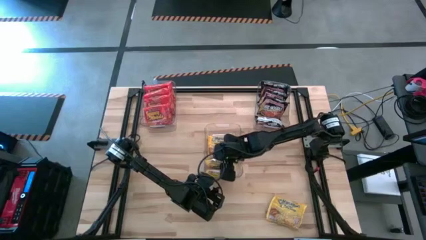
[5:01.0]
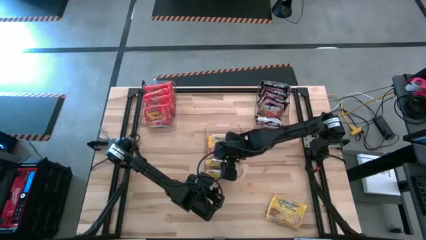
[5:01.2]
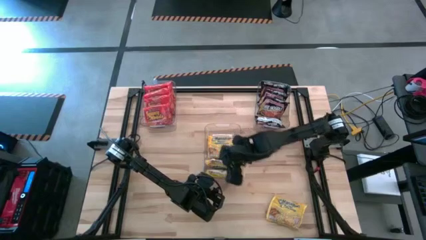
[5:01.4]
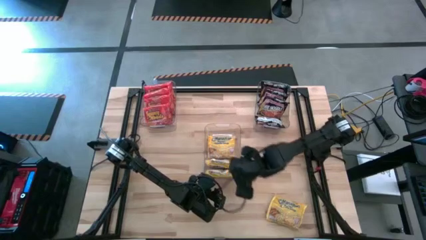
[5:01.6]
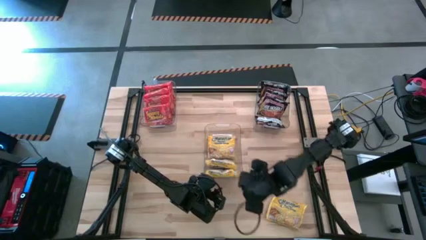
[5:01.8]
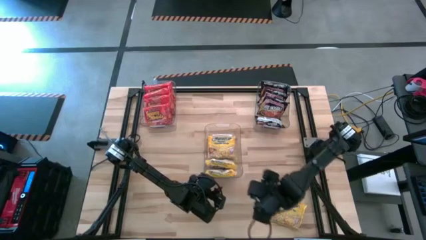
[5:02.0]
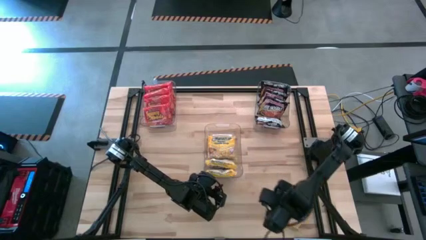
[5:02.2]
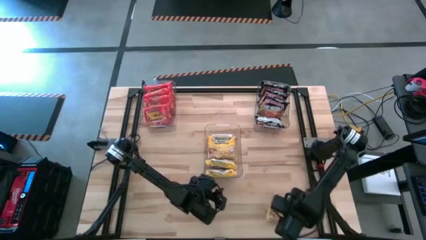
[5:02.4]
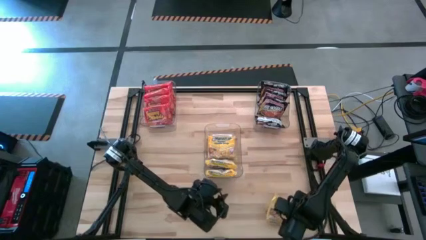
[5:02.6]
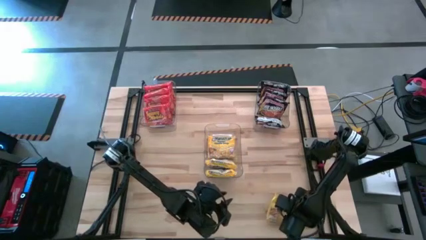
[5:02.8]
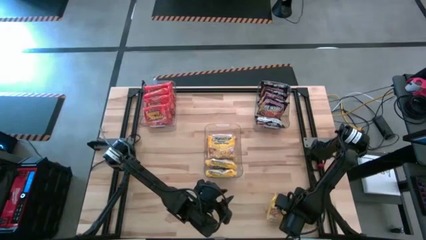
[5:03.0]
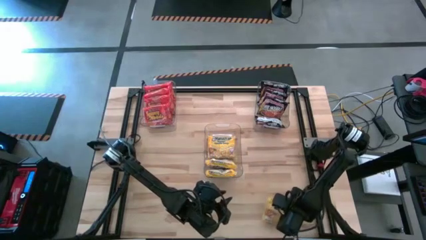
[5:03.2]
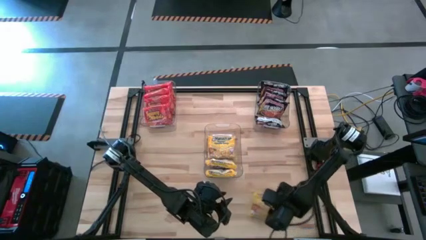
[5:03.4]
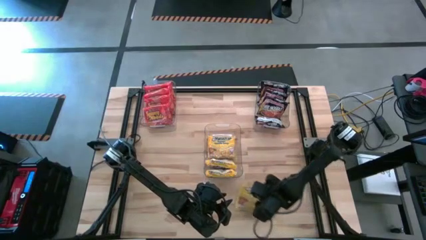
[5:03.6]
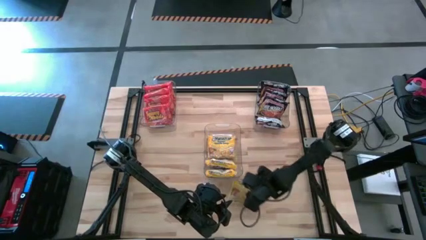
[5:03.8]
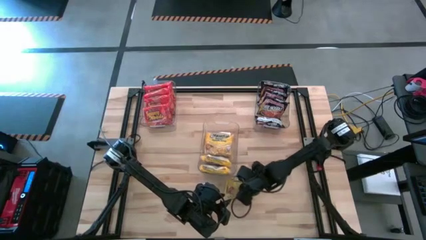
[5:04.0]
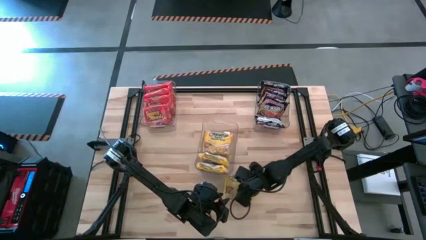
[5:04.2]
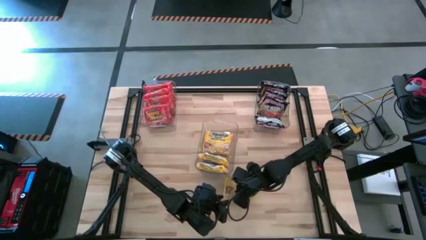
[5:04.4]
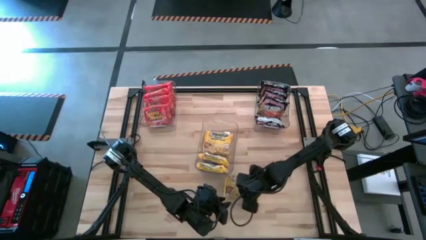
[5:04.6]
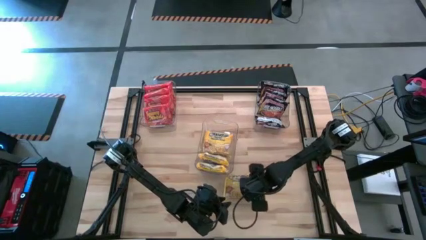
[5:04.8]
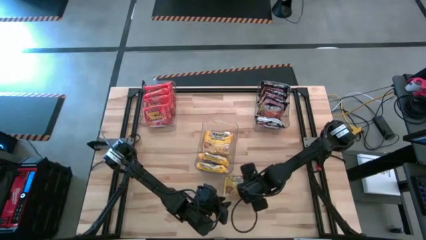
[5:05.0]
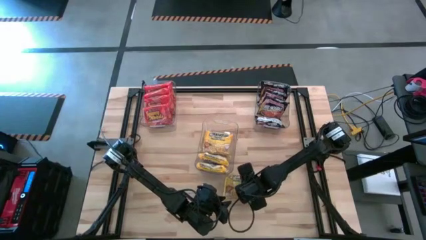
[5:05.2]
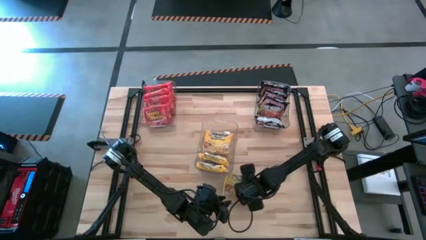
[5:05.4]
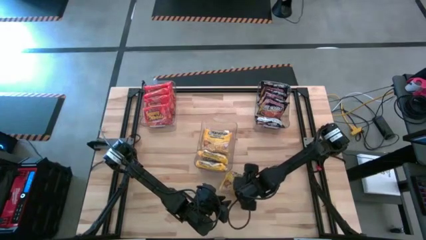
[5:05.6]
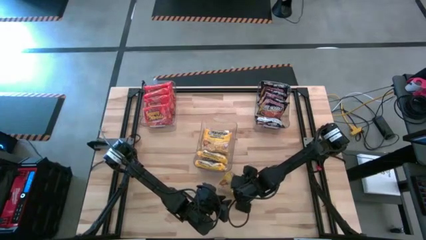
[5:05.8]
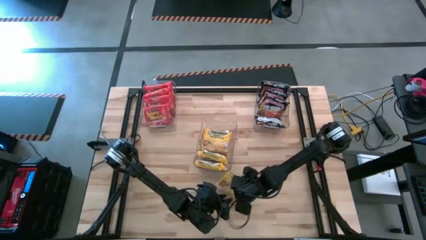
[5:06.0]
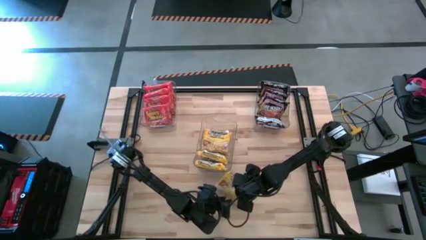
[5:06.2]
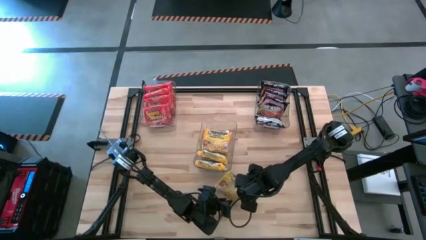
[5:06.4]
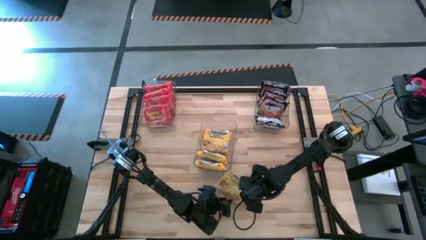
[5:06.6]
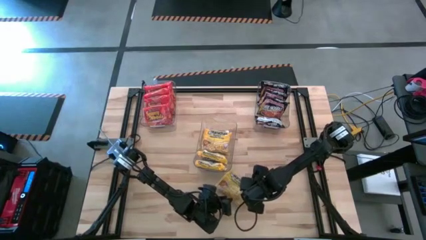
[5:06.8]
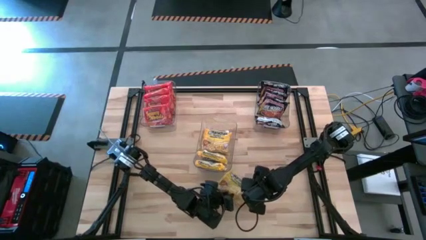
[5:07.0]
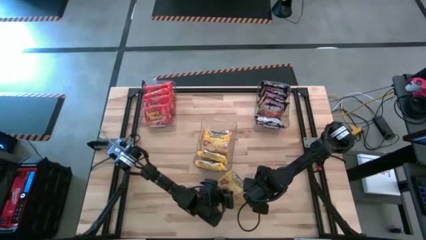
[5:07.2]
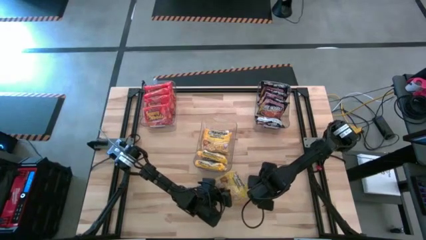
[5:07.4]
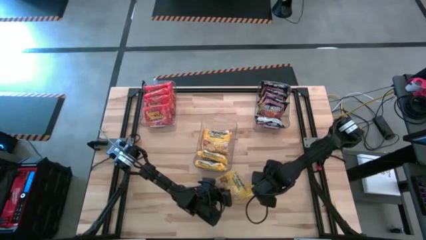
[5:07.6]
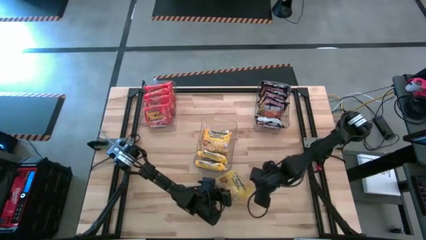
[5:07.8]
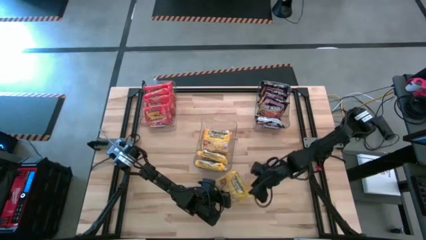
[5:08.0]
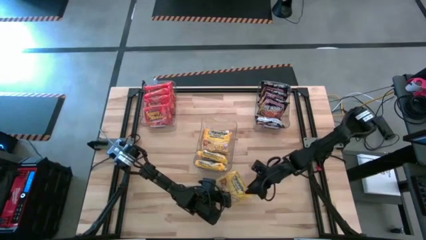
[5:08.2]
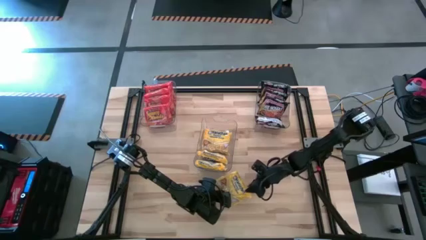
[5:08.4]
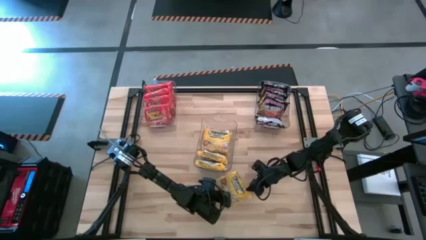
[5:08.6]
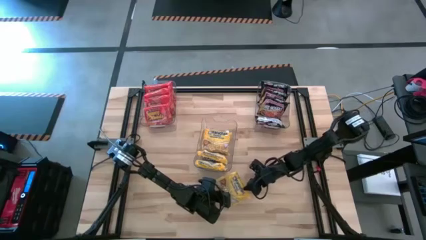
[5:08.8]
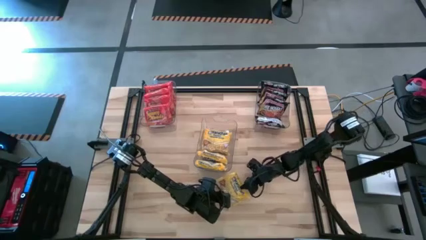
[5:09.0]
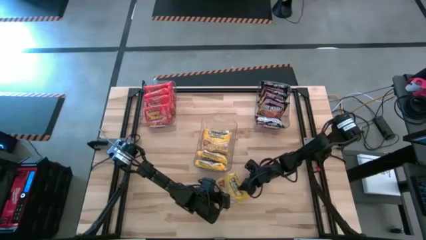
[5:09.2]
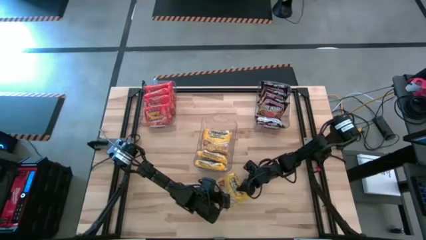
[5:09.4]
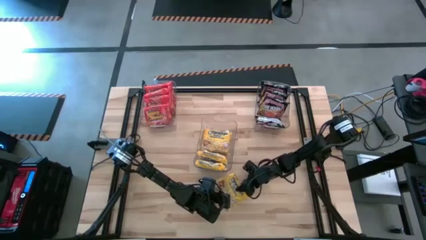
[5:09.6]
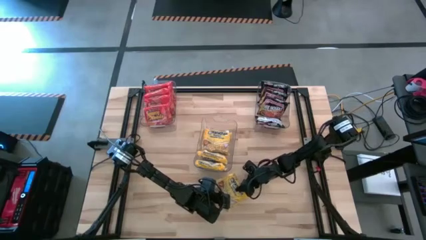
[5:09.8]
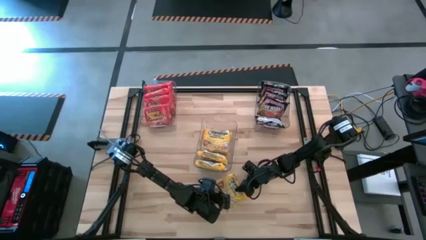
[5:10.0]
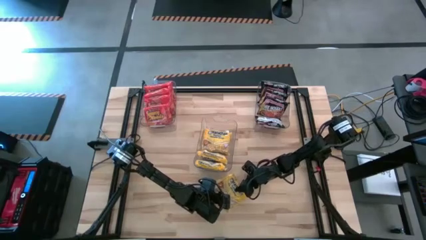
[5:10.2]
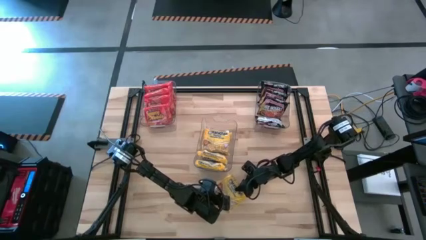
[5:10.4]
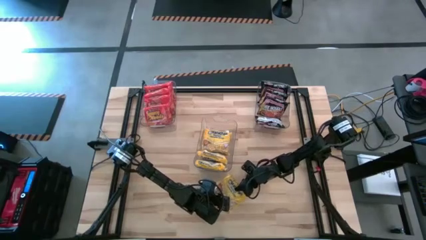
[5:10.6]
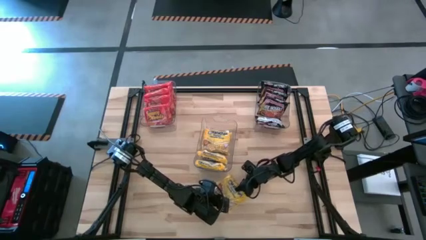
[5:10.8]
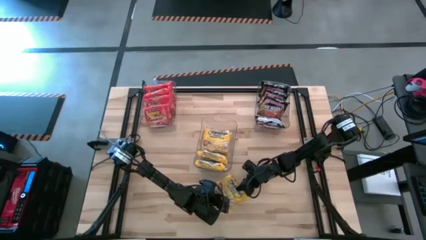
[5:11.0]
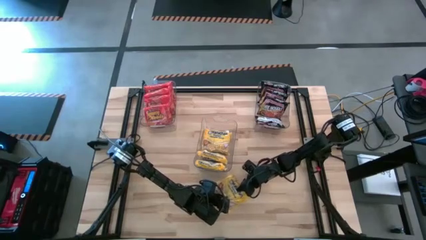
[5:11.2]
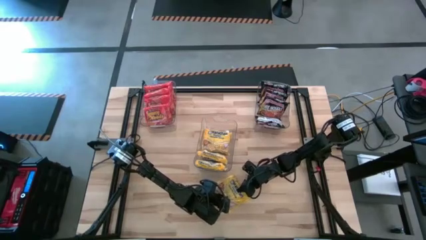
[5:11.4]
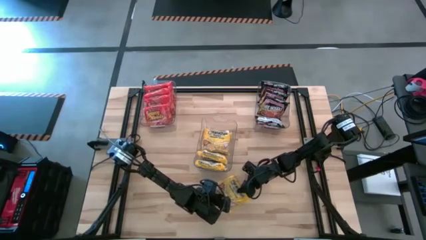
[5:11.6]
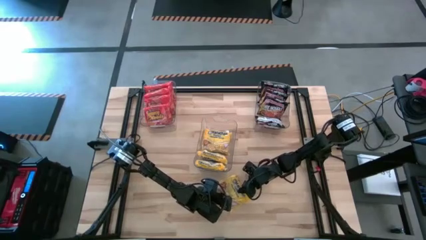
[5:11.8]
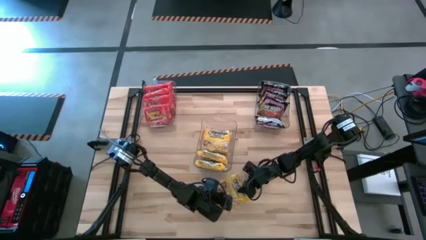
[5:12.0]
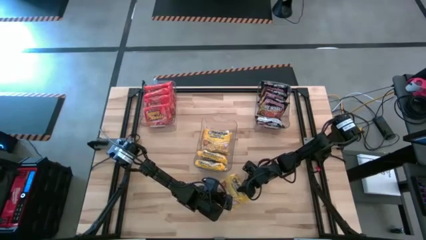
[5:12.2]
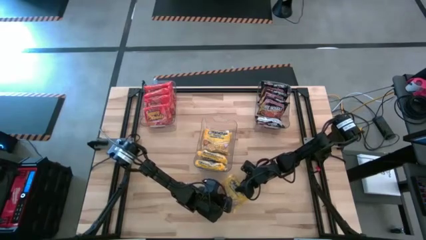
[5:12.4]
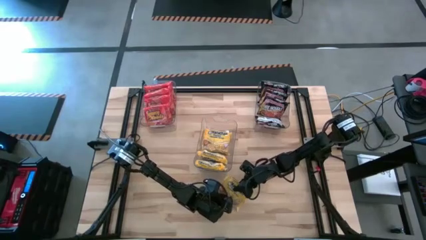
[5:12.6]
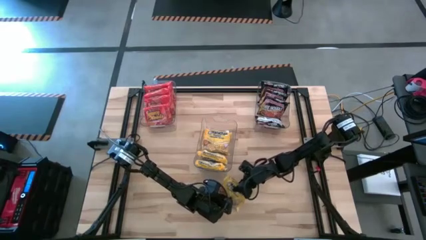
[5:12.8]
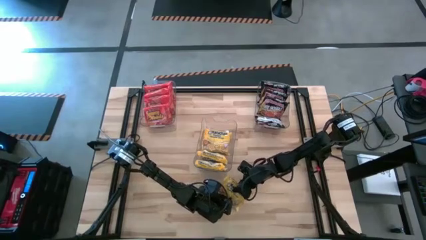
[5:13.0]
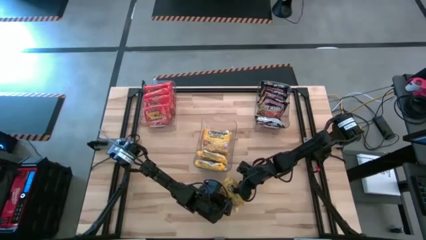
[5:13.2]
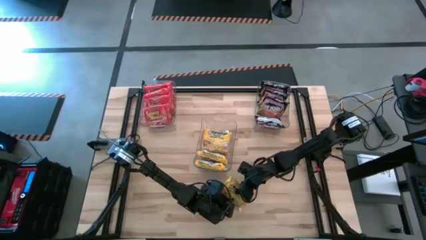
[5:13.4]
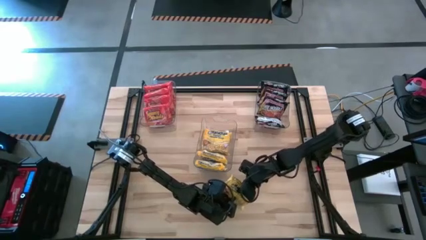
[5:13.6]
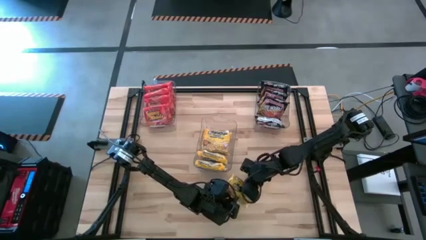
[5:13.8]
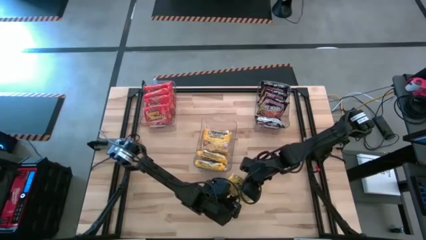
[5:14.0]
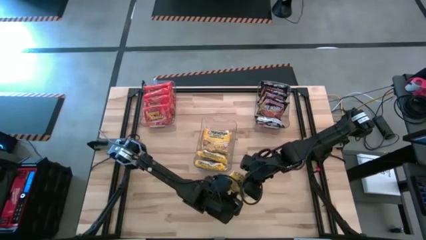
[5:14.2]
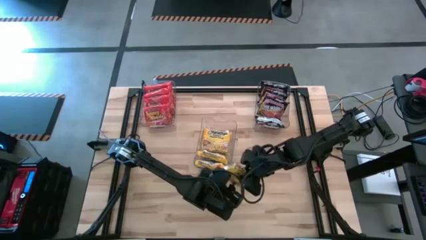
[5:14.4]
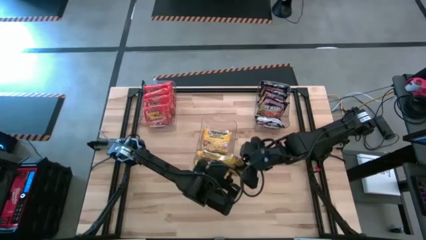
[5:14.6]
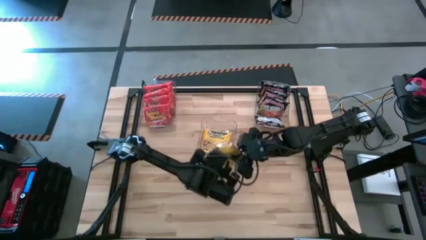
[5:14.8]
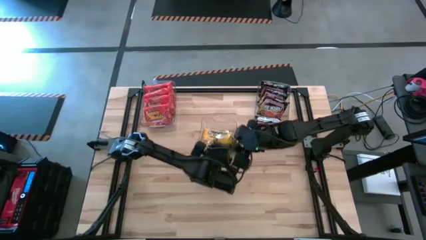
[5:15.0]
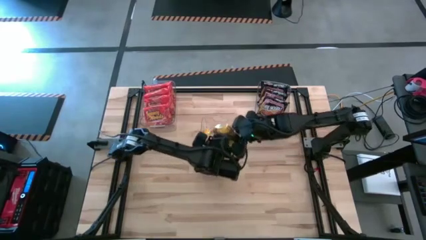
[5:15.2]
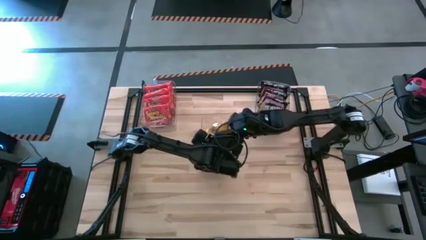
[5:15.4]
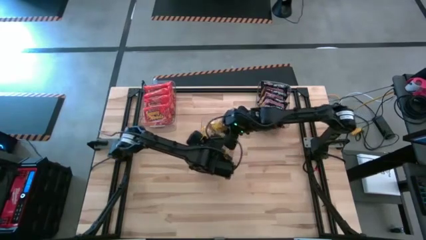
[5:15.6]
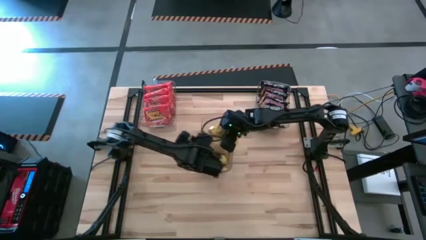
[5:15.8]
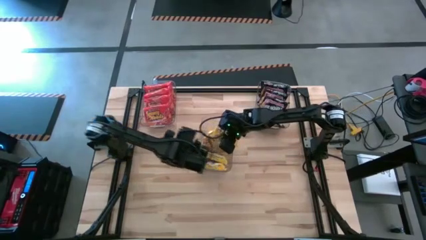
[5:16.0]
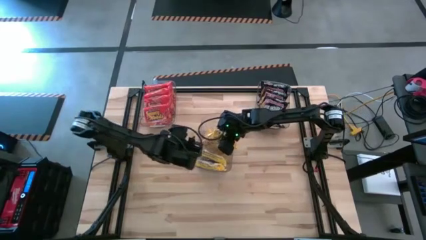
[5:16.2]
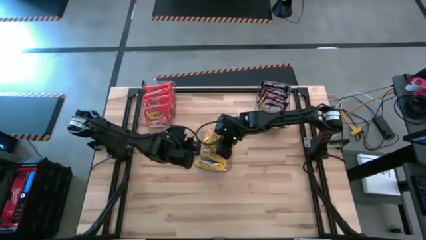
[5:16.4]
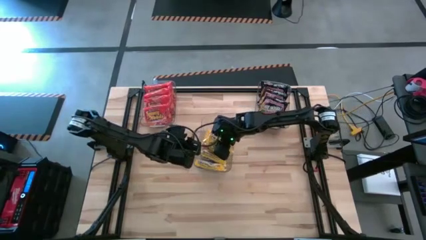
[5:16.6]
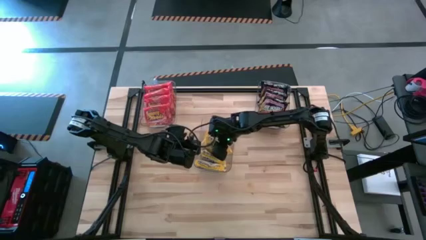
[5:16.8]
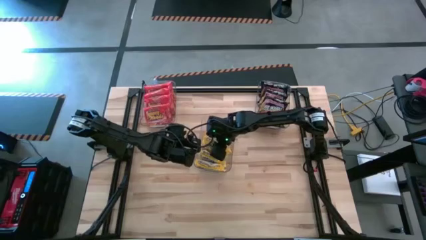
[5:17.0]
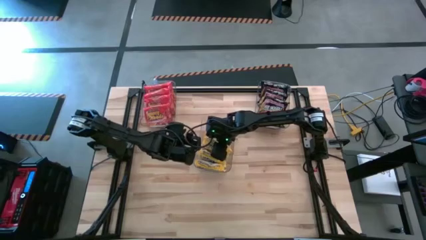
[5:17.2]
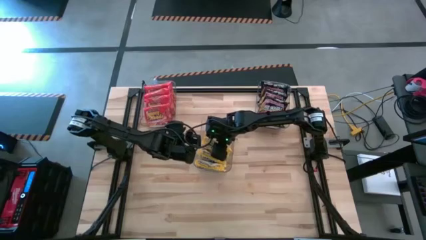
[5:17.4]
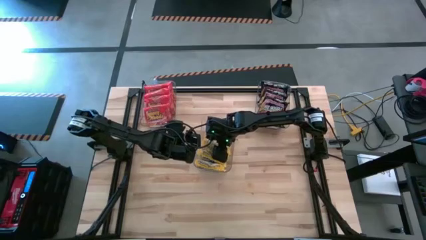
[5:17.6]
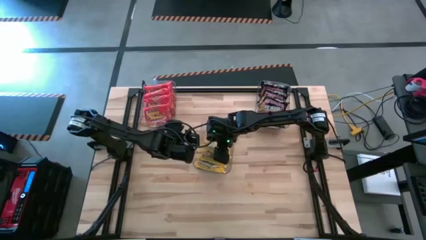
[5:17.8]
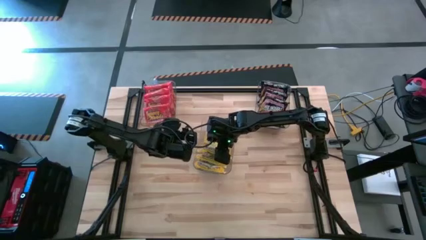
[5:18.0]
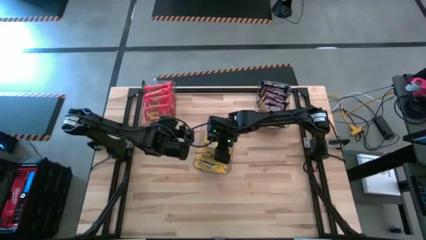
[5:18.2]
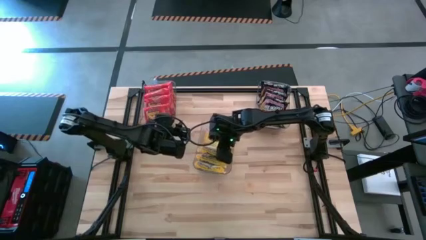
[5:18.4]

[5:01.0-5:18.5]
Task: Sort Maruchan noodles
Put the yellow noodle pack into the center transparent bin
